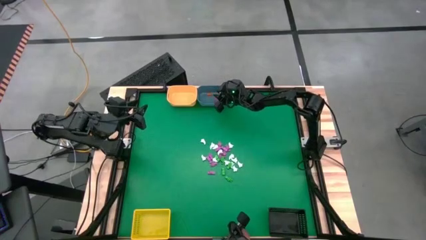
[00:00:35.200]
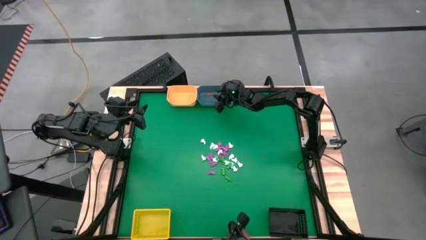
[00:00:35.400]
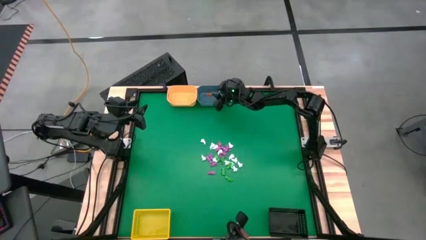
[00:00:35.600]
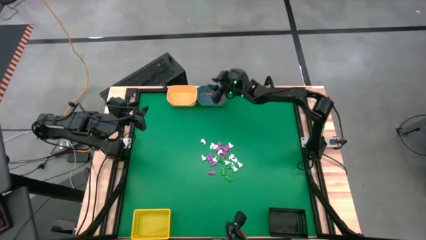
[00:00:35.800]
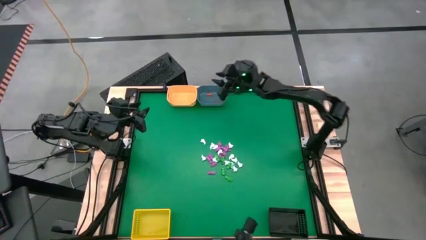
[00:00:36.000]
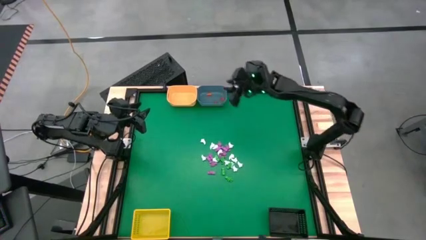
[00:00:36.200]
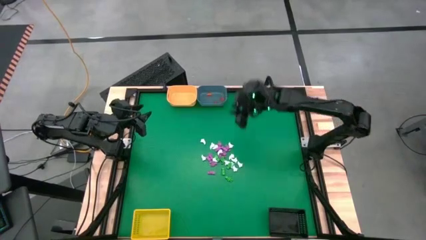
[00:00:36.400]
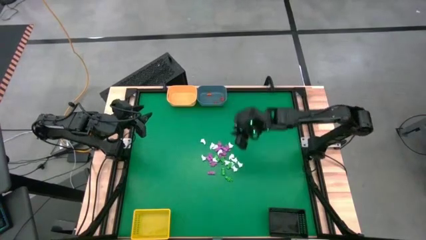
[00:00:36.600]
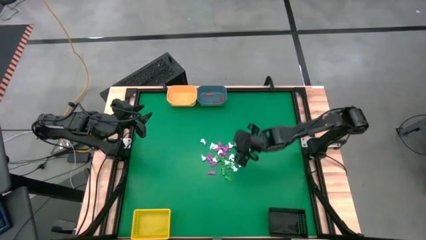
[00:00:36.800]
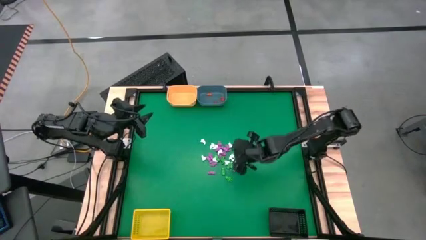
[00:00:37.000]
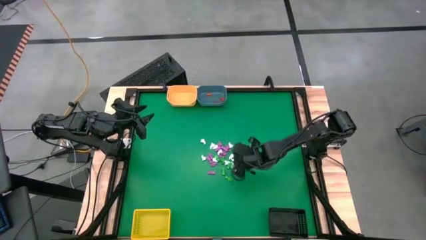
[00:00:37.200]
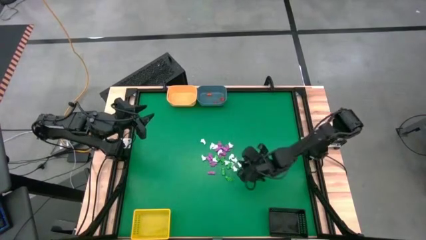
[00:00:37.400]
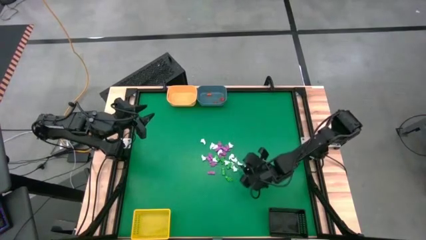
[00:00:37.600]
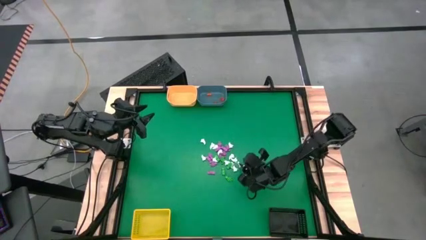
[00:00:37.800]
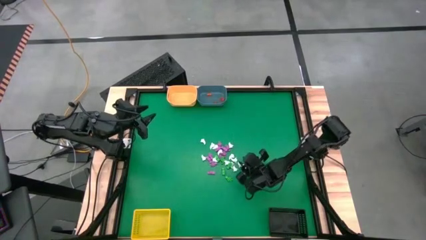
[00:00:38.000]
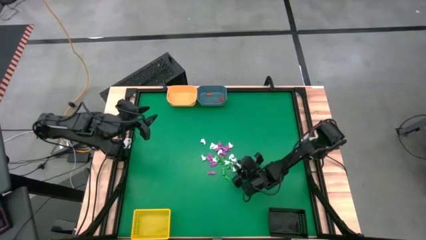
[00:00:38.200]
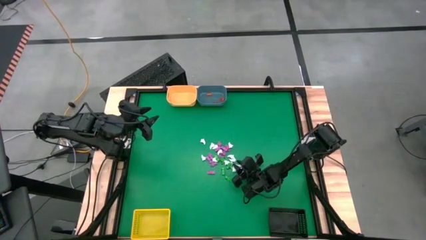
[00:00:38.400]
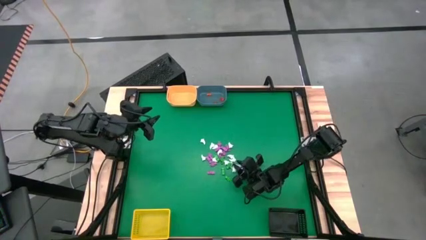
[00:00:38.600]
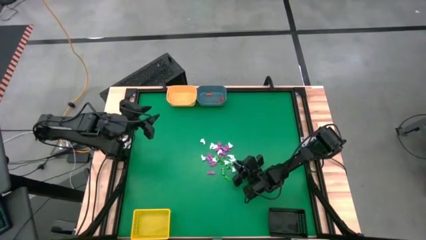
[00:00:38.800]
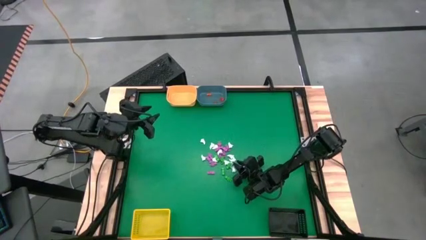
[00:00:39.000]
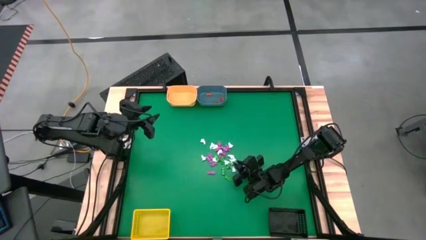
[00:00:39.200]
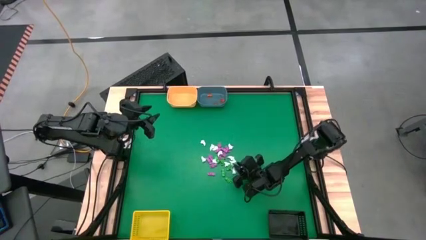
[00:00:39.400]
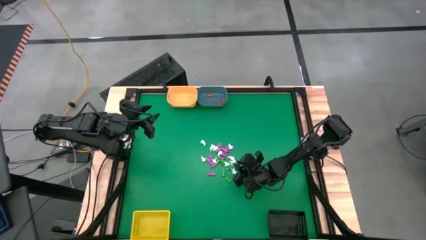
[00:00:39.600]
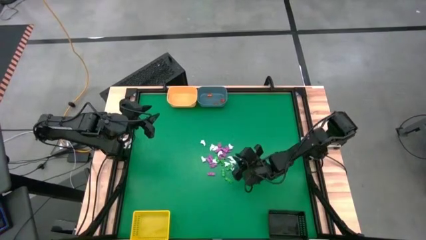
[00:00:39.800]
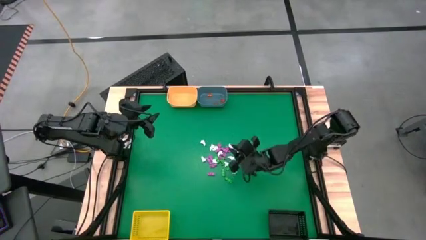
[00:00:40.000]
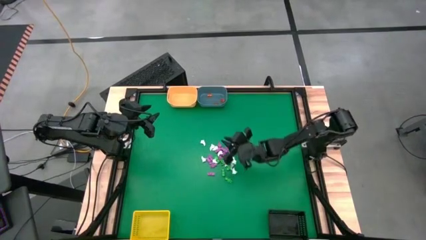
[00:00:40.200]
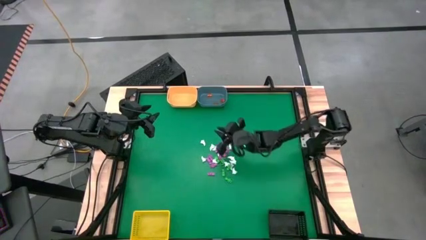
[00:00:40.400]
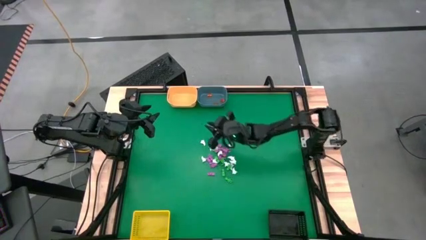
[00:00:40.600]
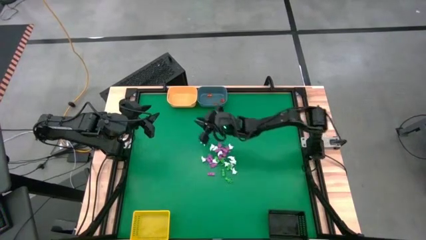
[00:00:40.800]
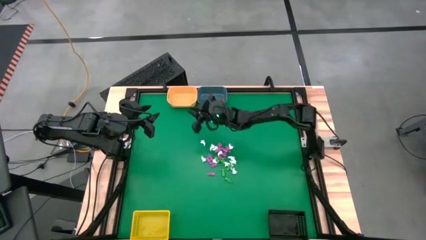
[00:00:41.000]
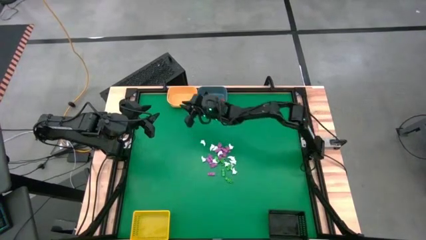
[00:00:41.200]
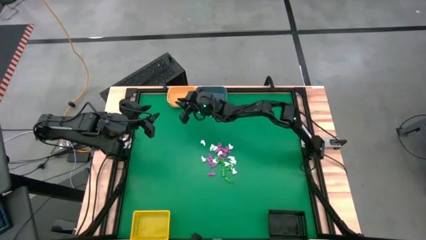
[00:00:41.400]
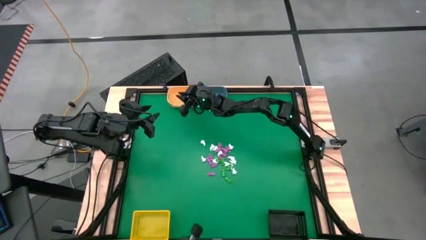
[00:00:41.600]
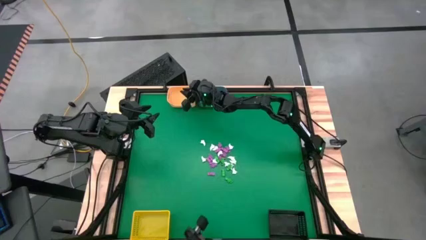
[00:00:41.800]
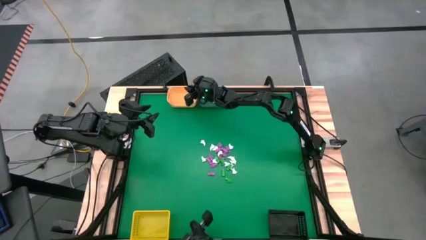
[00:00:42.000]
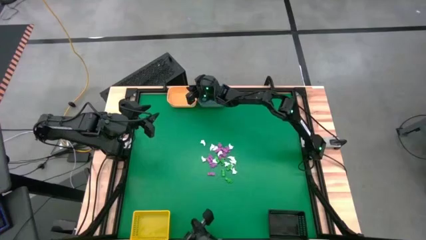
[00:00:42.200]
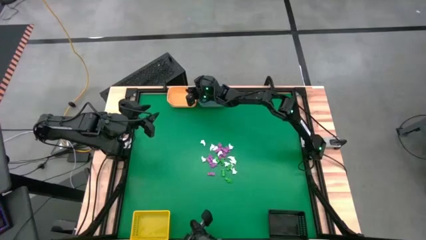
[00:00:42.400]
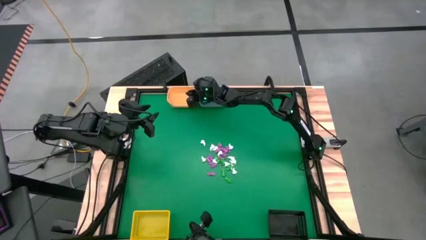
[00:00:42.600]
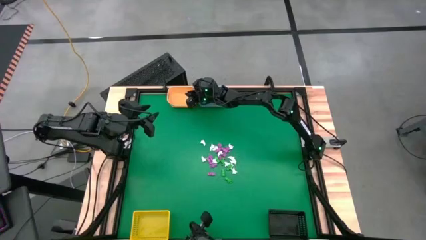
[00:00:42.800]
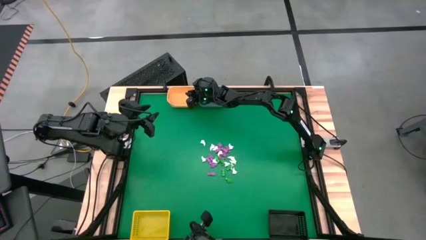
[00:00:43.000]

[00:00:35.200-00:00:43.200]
Task: Sort Halloween decoration
Put the white ghost into the orange bin

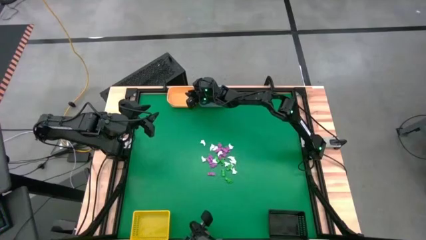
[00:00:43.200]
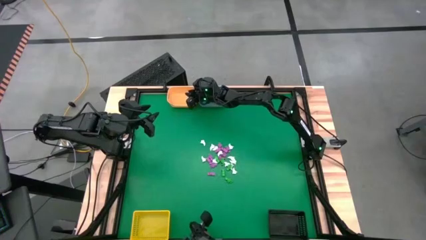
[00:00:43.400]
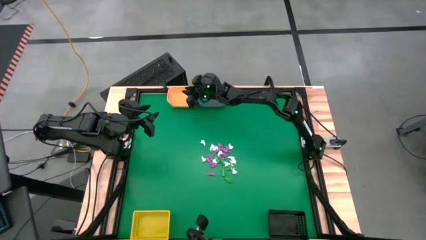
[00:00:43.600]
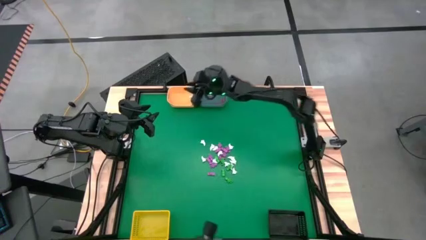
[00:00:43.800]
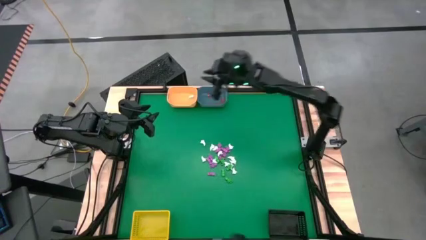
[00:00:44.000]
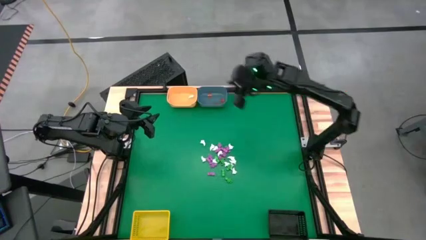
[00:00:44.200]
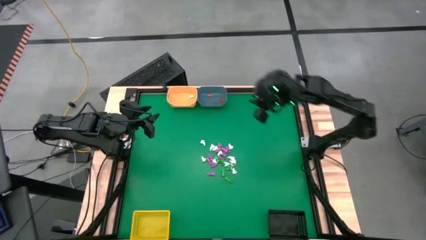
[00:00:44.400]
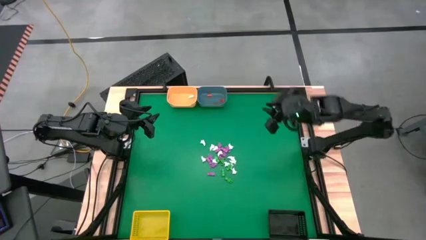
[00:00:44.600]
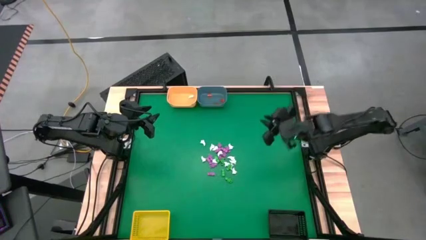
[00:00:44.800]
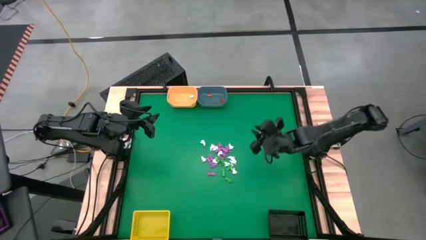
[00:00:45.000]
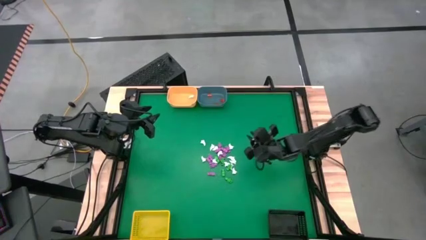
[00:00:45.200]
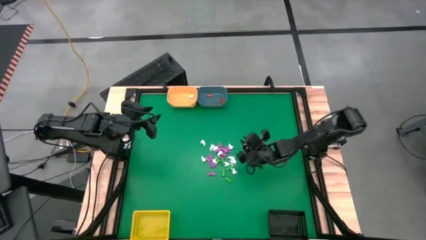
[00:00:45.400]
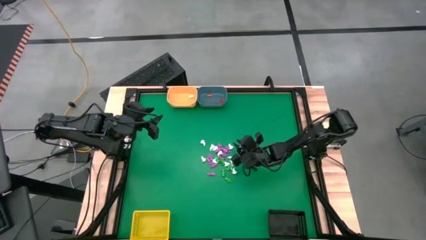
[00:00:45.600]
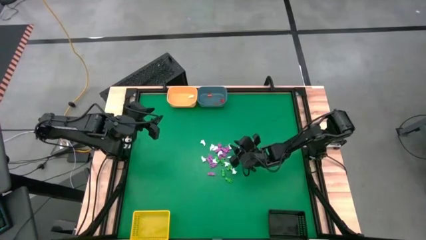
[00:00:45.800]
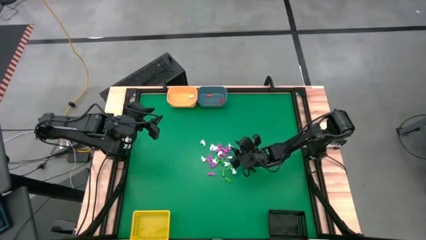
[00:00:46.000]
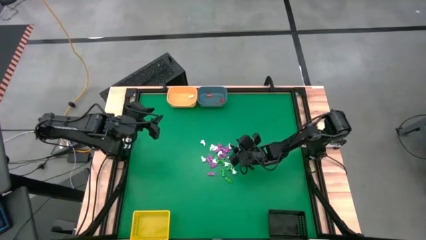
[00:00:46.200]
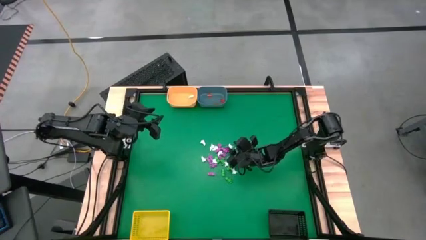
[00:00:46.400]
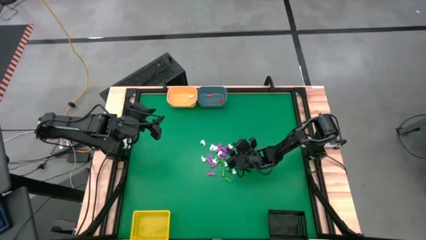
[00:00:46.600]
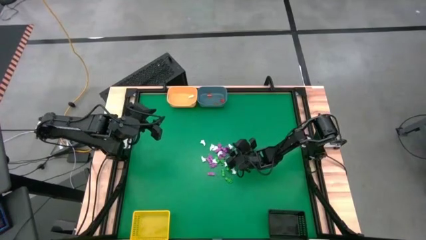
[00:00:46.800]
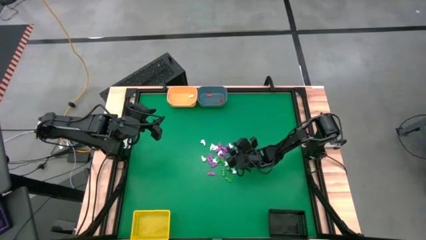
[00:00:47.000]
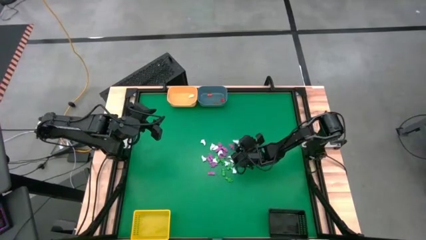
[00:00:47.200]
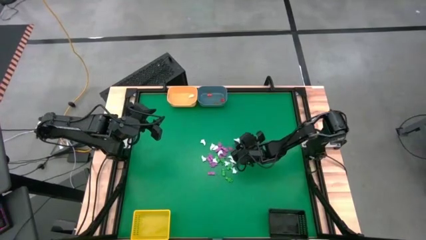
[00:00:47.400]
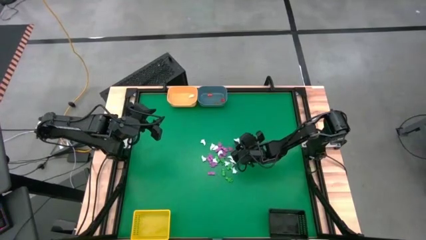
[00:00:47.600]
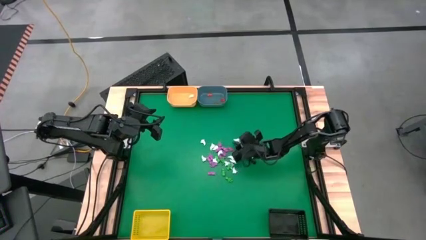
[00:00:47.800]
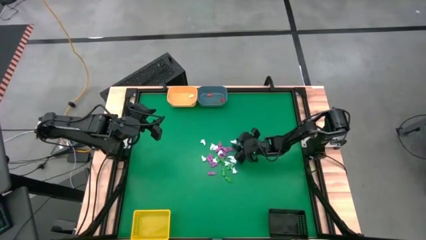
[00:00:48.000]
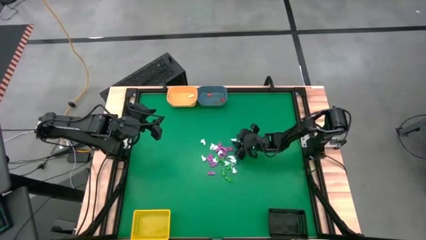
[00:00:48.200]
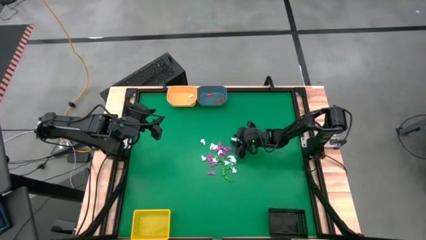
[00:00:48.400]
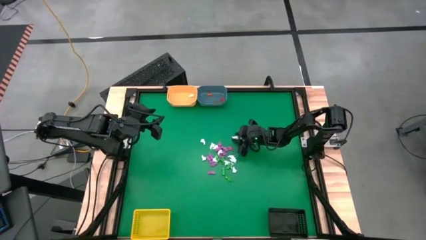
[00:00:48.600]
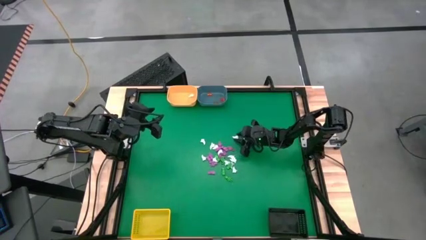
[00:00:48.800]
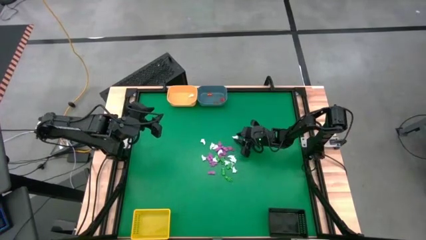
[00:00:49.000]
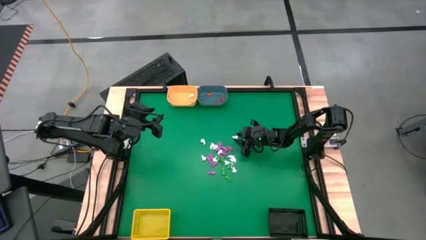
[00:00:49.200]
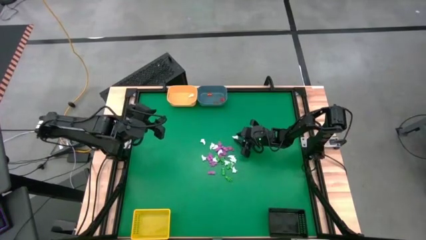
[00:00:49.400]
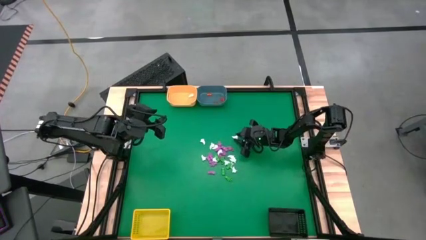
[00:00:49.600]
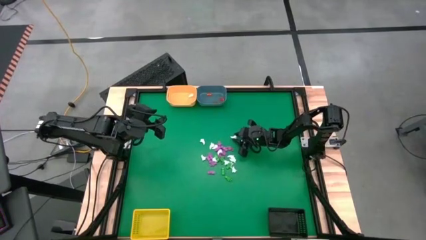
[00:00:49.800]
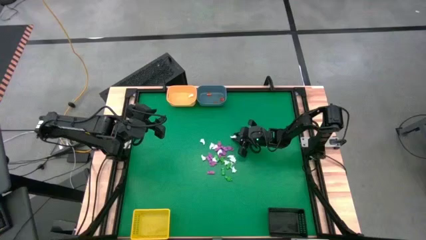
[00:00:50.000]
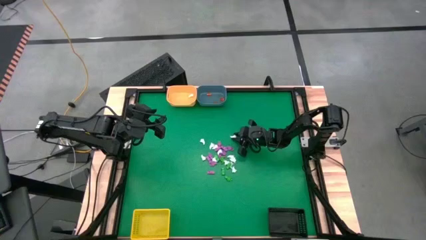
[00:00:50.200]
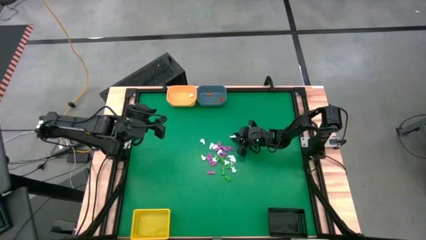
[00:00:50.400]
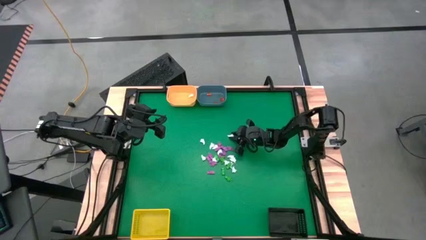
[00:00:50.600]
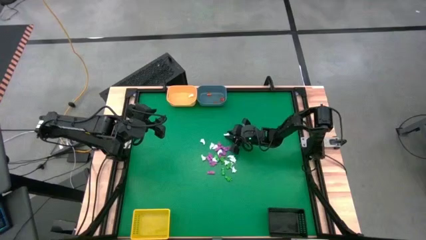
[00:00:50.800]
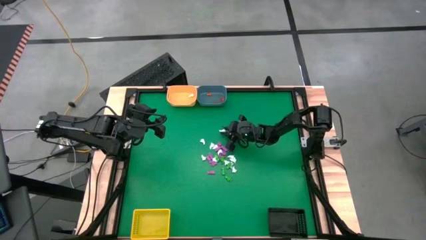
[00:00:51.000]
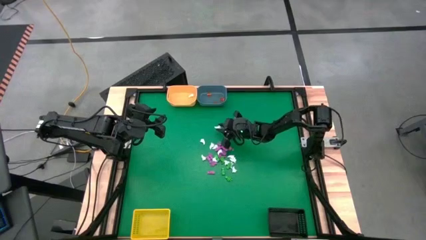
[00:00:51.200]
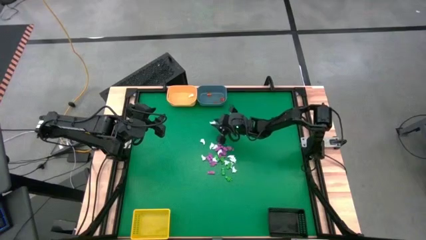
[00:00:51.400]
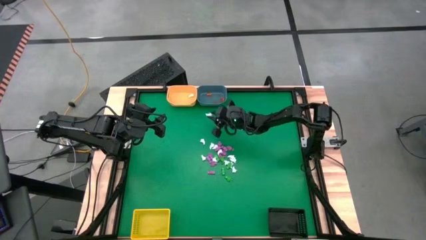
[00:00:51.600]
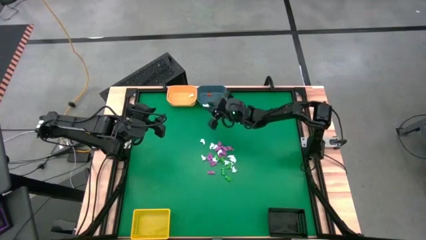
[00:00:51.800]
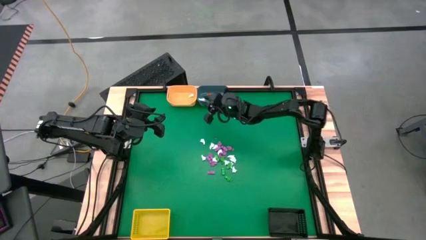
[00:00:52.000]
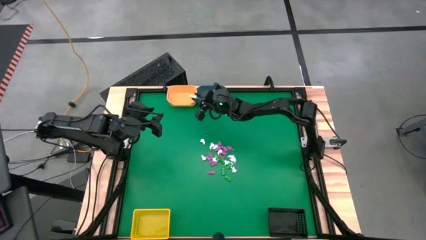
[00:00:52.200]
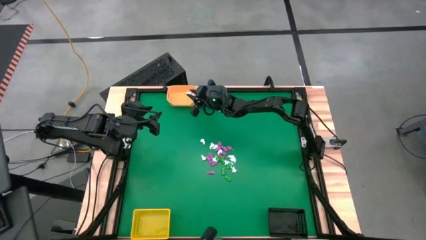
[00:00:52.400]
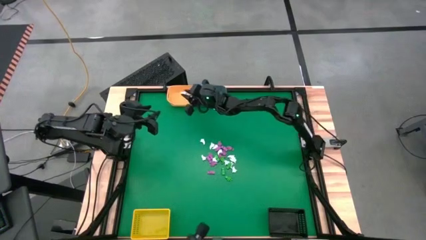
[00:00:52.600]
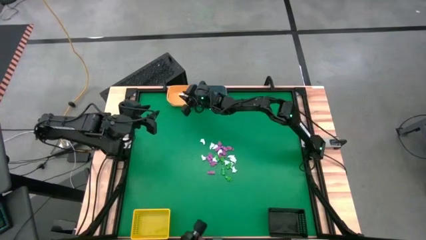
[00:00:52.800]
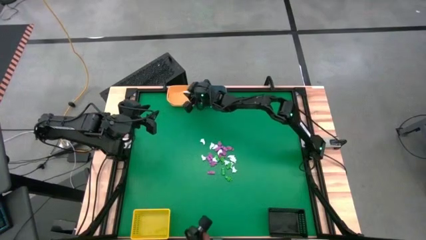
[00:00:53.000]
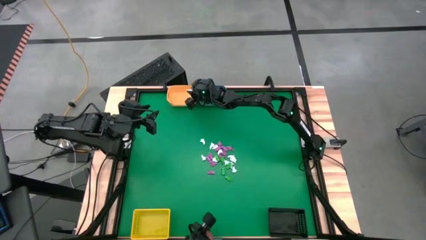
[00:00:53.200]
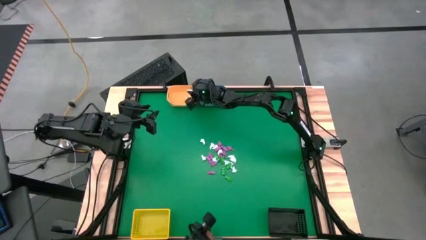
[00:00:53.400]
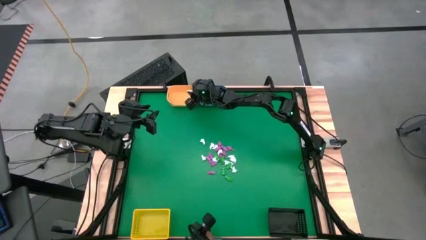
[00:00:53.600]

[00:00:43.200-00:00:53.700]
Put the white ghost into the orange bin
